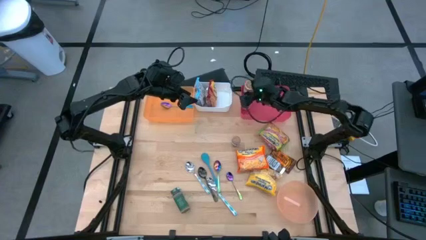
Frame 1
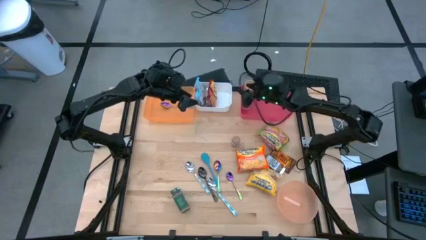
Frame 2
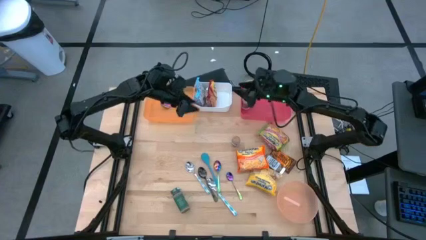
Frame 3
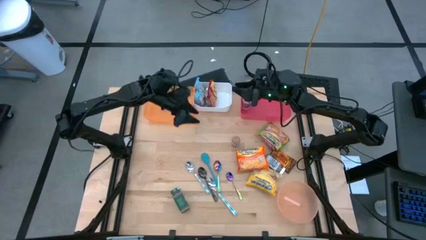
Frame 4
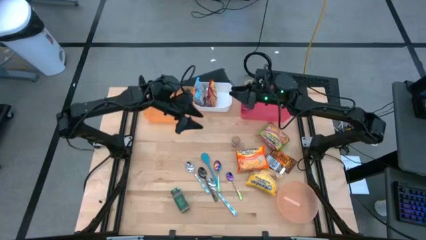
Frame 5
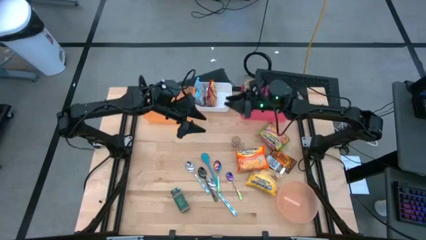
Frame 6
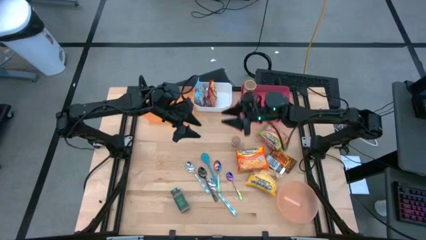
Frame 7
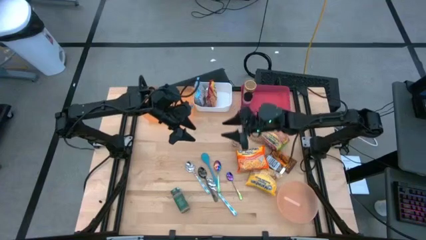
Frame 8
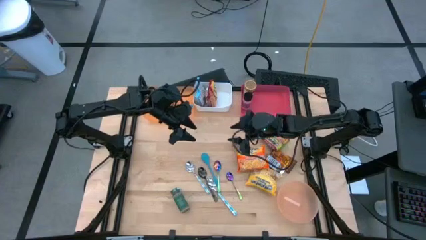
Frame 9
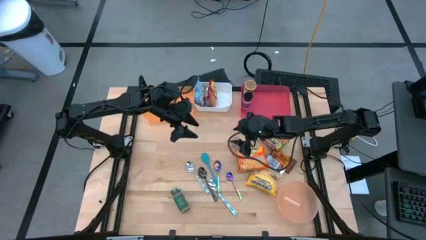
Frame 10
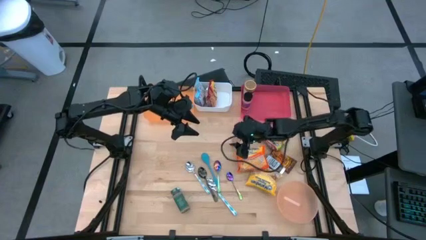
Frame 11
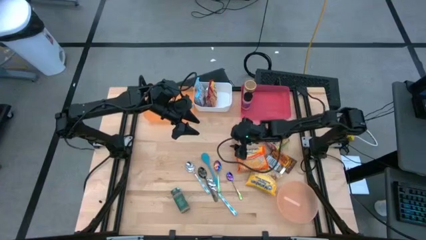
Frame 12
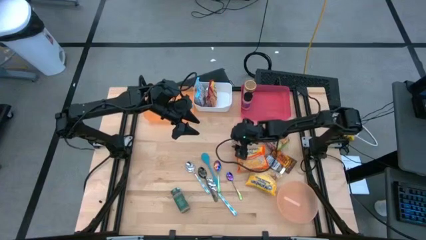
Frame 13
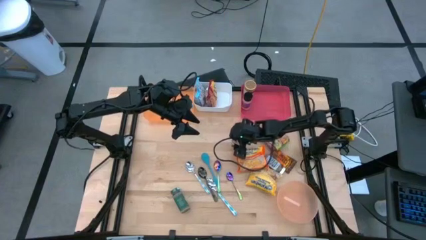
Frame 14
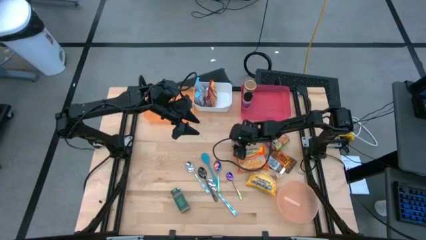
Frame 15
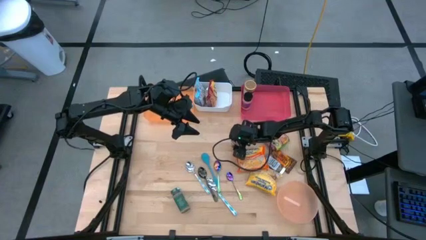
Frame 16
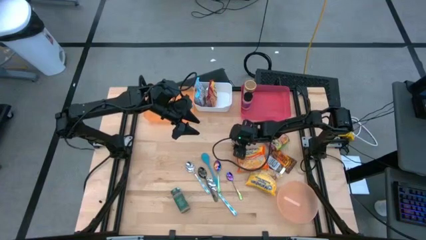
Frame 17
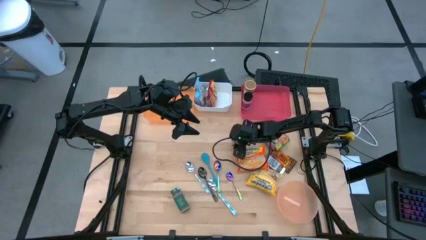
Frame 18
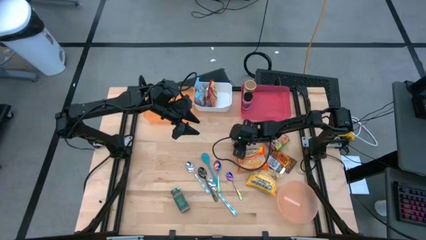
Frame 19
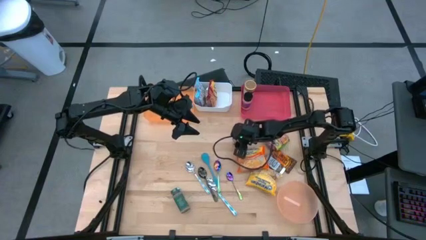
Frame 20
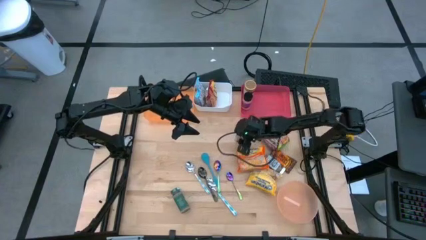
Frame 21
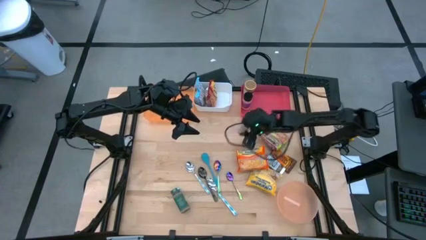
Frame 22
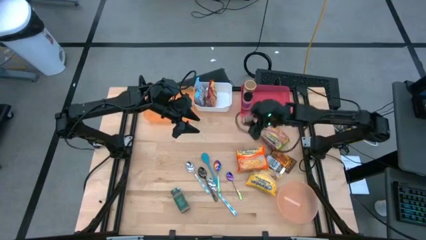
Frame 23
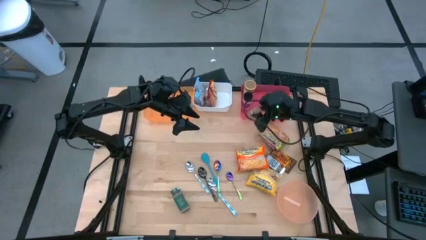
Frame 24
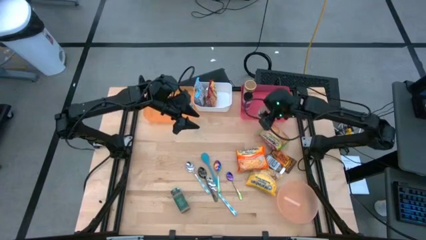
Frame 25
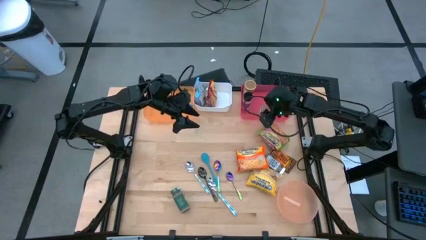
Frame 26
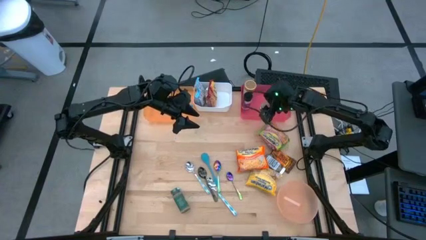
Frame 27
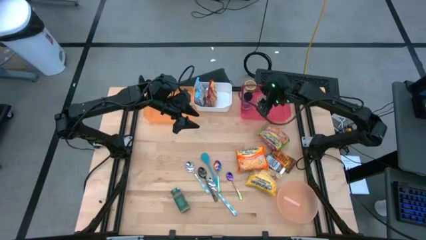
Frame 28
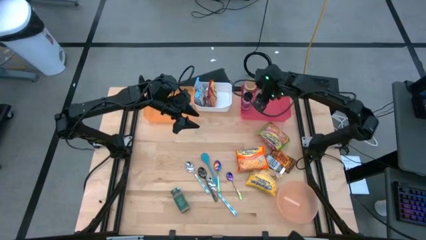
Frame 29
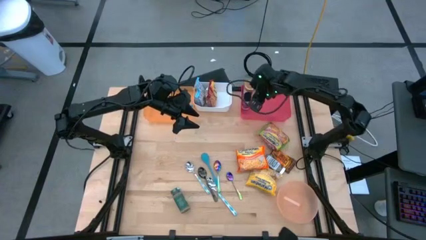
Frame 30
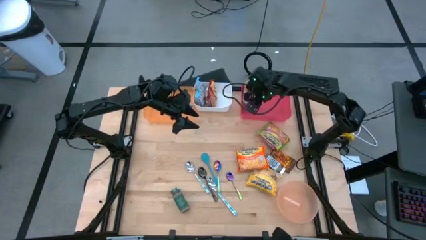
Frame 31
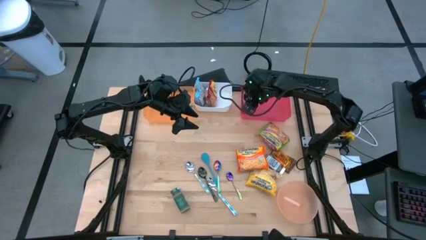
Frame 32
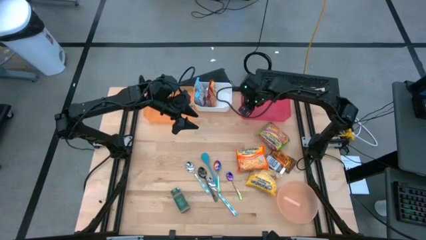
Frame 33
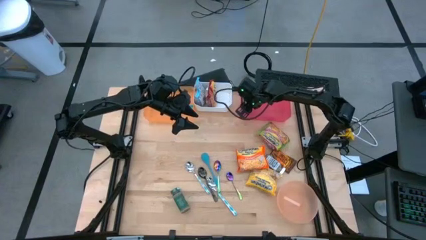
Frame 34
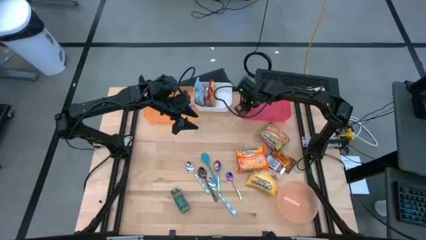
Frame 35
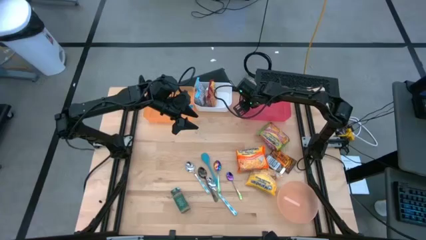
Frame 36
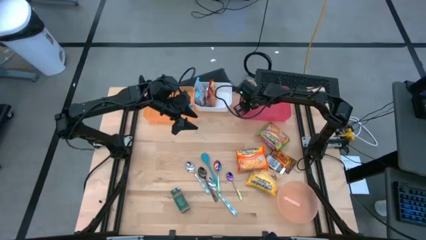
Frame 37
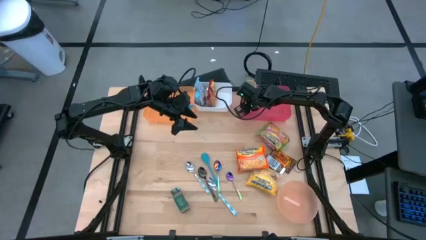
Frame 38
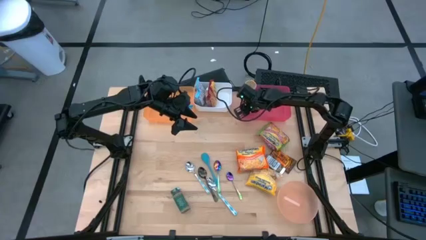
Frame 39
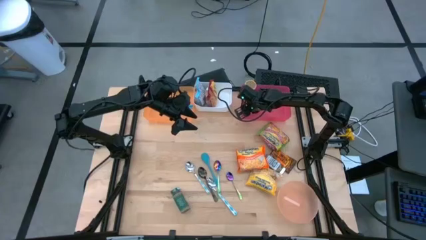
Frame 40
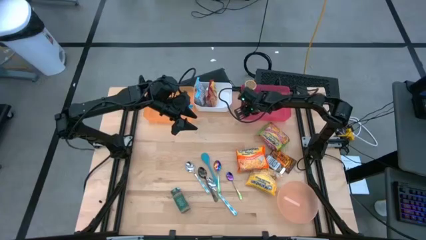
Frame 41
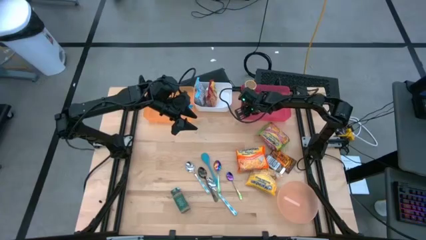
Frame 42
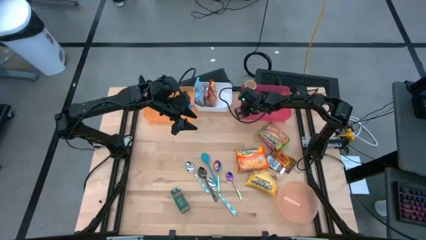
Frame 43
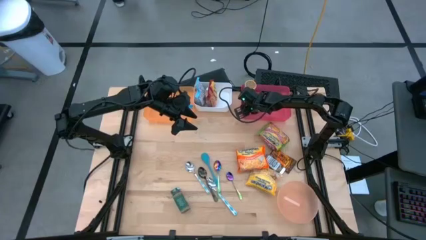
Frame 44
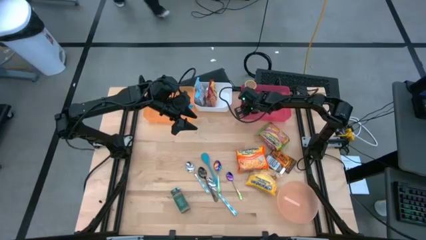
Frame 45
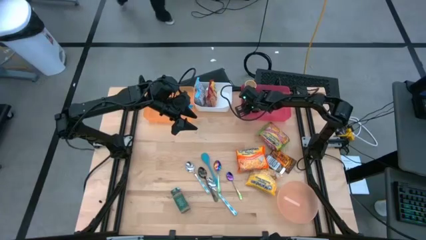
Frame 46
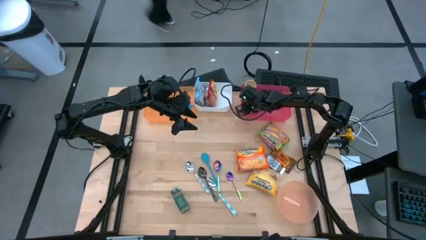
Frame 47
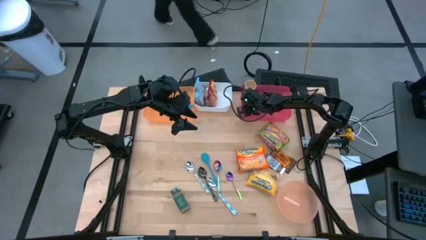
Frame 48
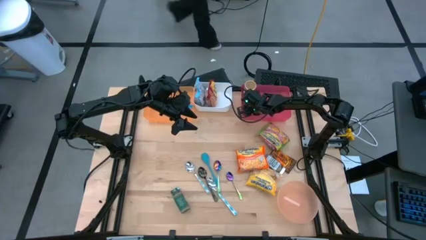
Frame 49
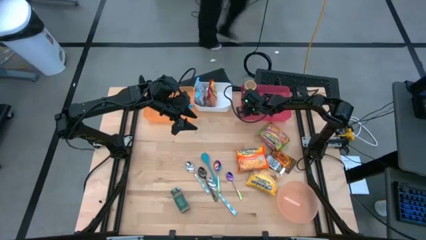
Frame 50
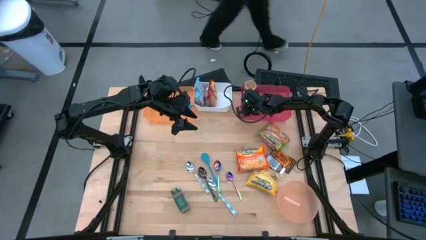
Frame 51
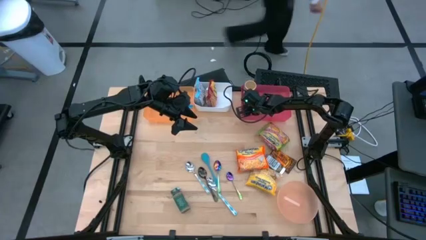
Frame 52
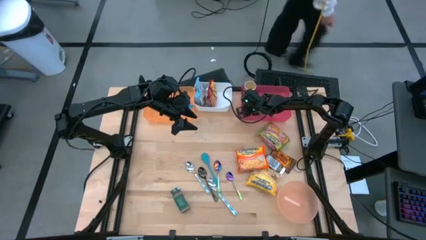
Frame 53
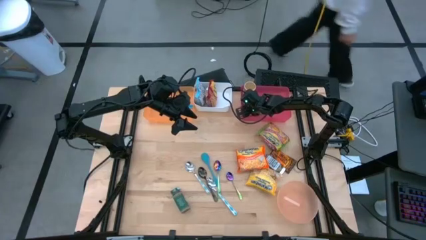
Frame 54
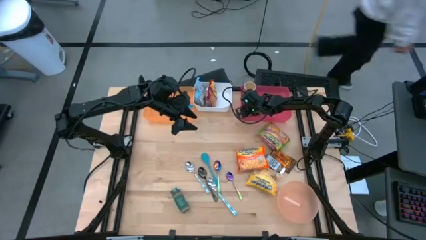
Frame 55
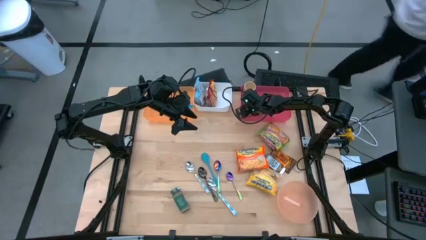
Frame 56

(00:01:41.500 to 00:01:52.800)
Task: Pick & Place Food Item
Put the brown spice bottle into the red bin
